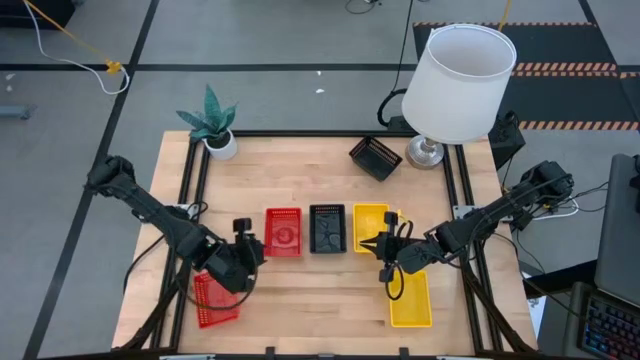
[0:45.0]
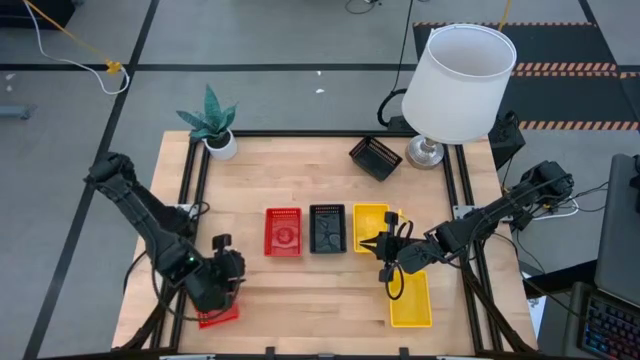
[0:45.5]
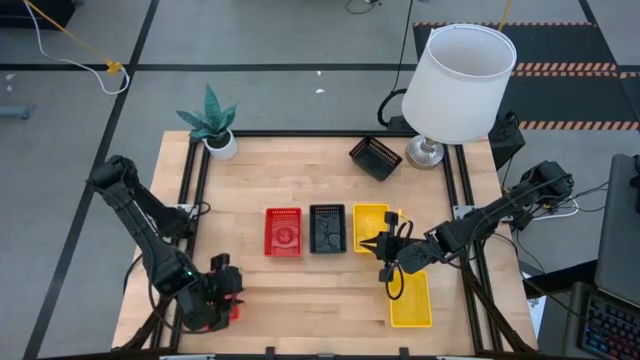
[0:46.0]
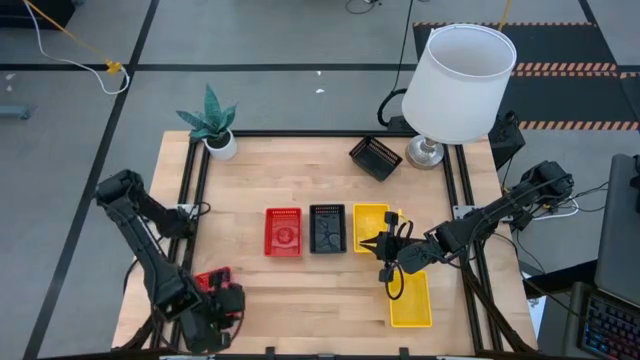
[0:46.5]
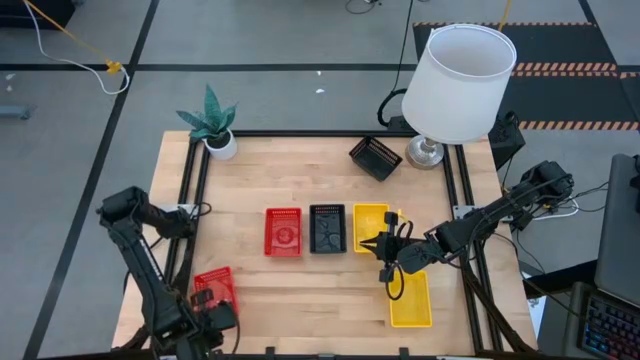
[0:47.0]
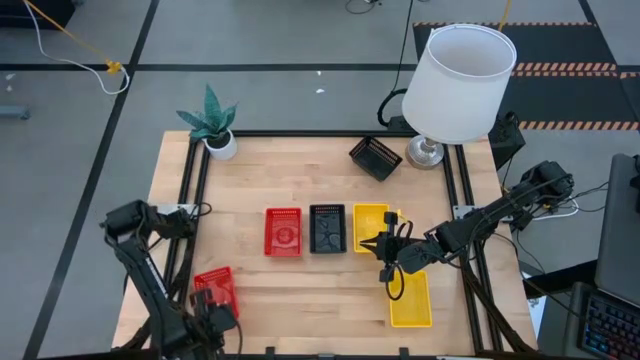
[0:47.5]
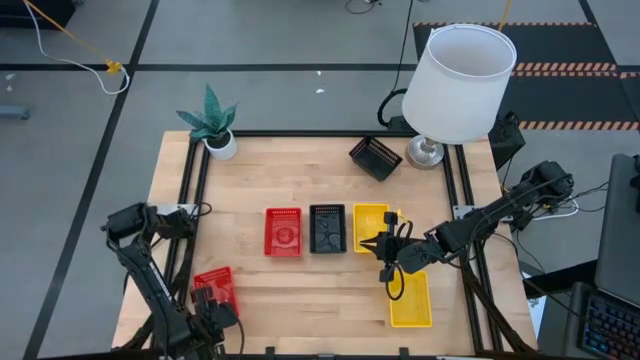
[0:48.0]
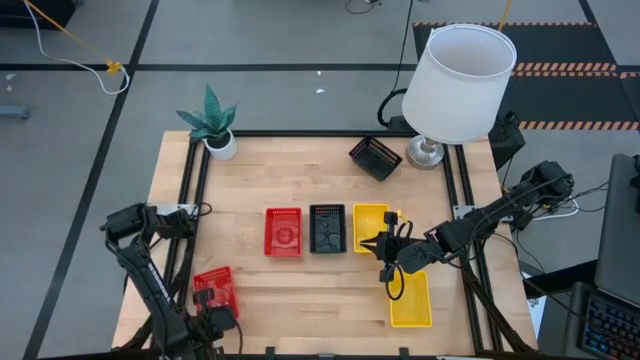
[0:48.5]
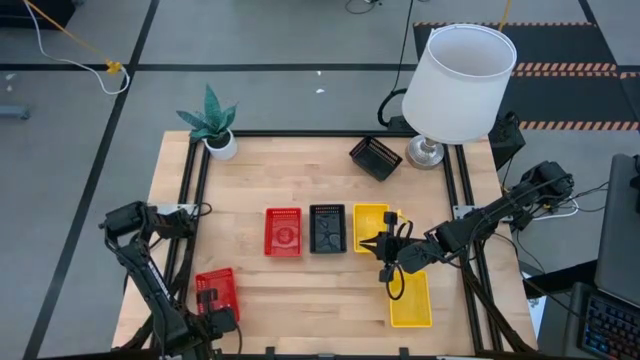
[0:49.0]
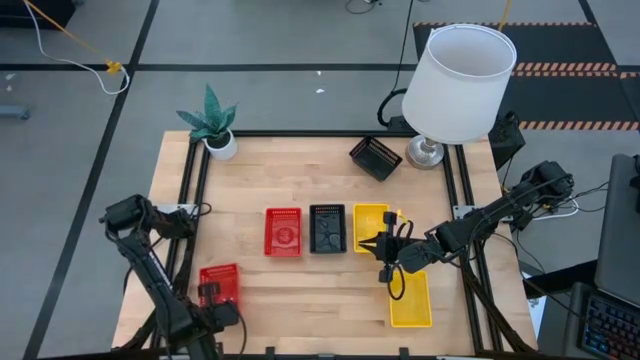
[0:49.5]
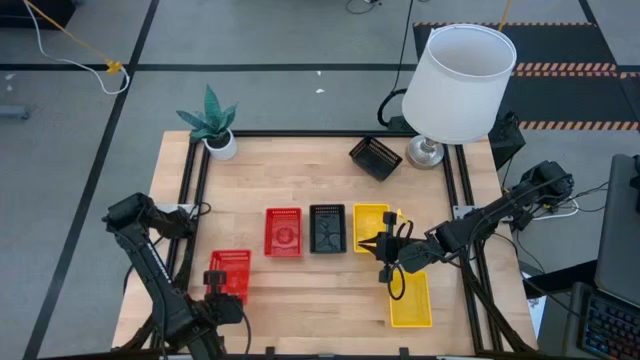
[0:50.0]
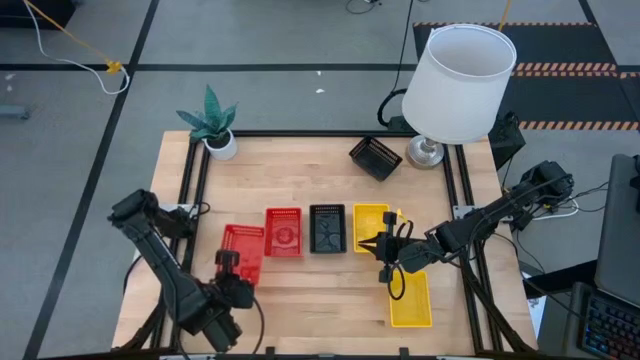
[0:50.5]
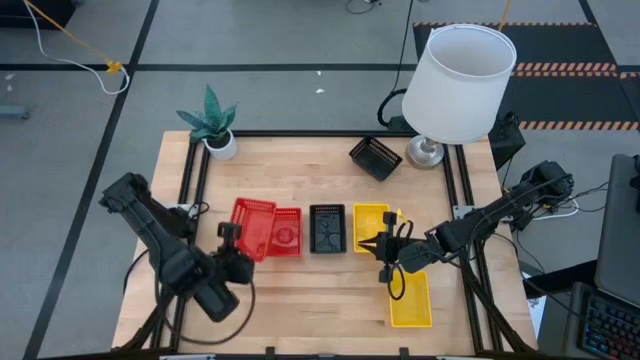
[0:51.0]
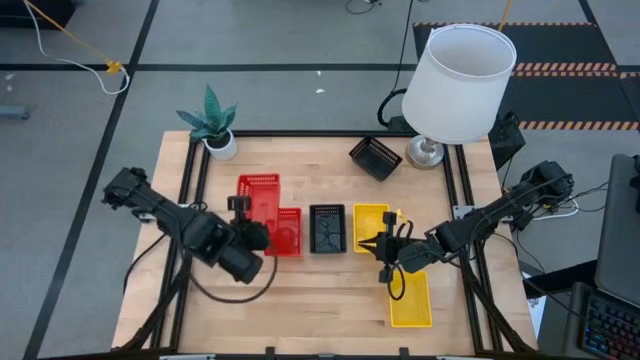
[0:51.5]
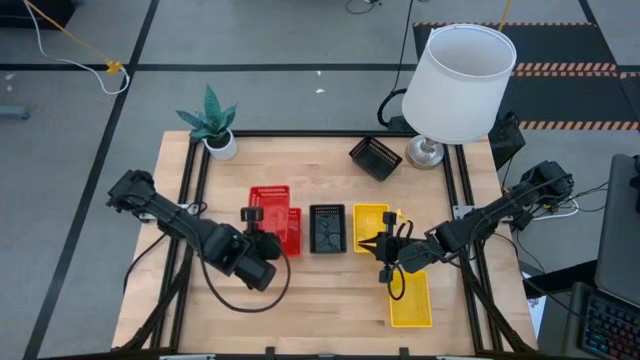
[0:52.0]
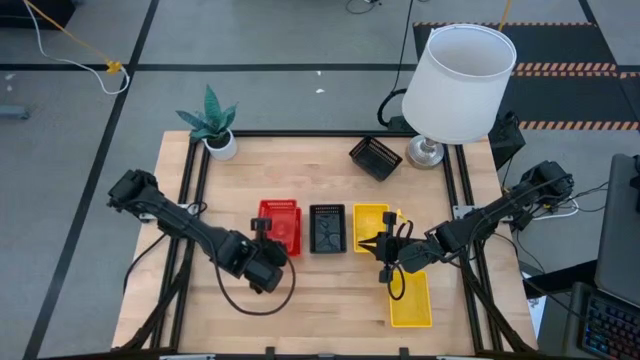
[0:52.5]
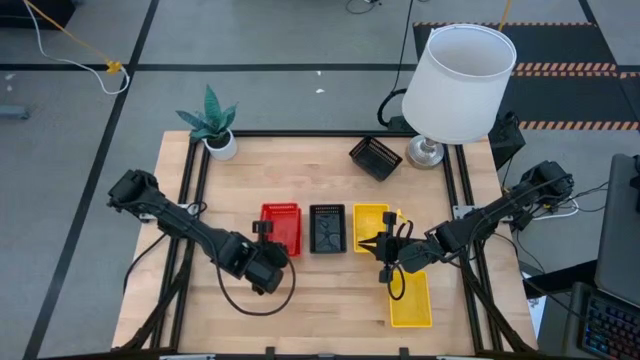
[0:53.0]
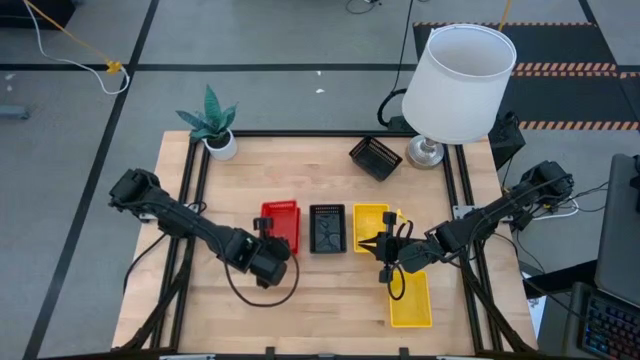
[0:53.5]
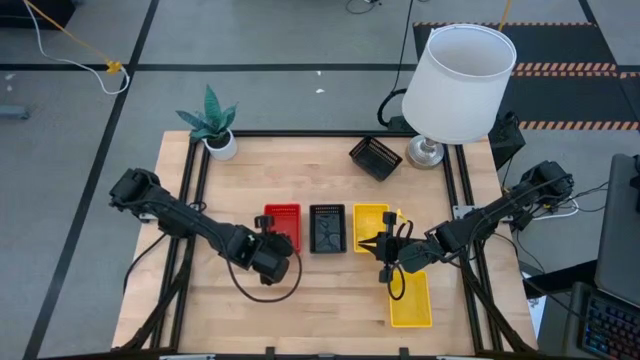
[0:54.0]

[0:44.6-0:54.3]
Stack the bottom red bin on top of the top red bin

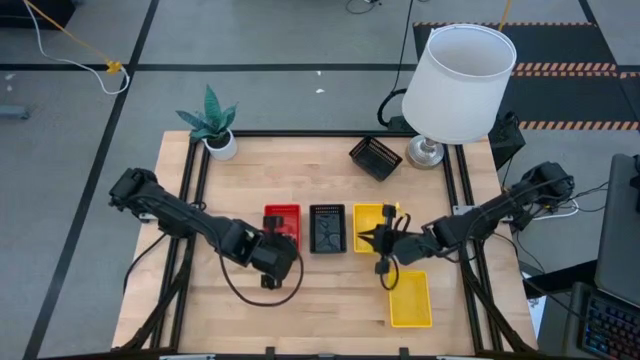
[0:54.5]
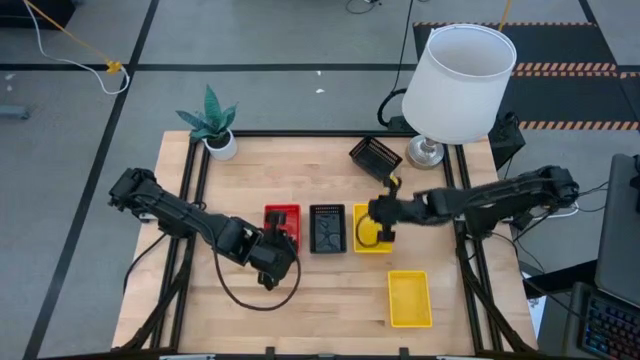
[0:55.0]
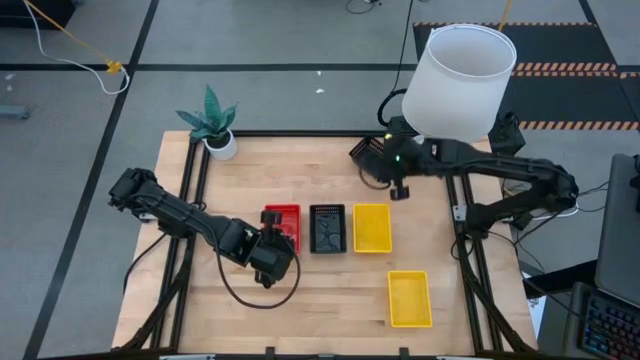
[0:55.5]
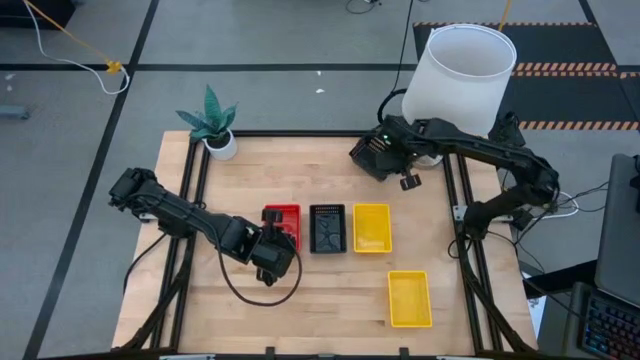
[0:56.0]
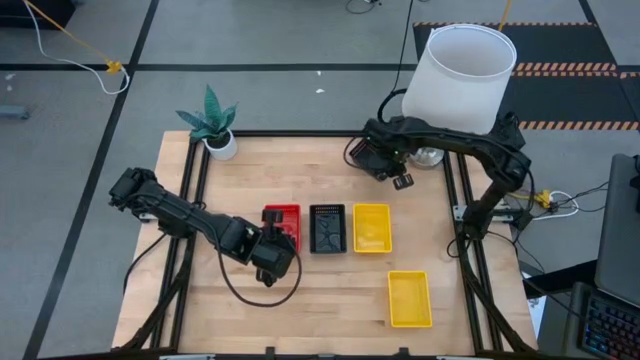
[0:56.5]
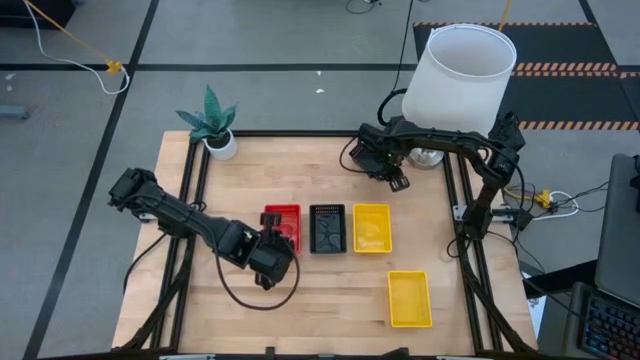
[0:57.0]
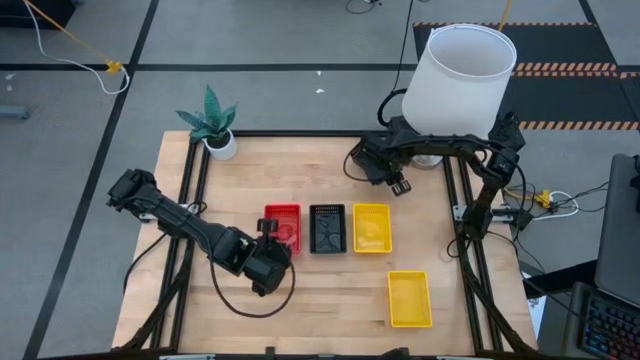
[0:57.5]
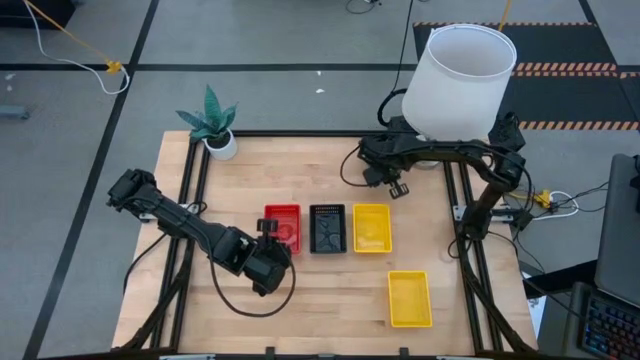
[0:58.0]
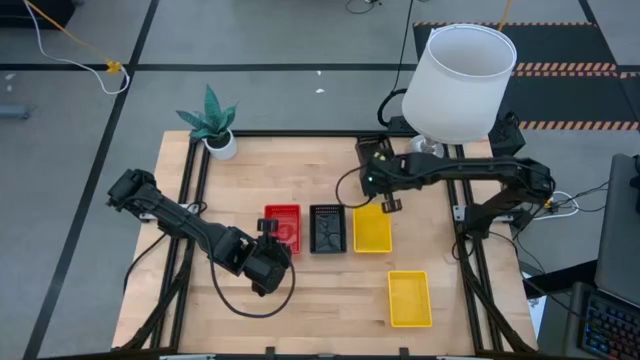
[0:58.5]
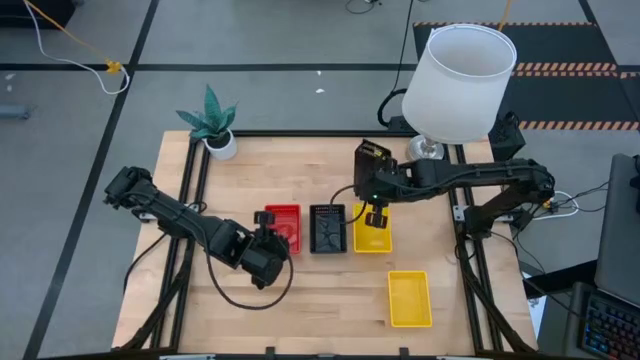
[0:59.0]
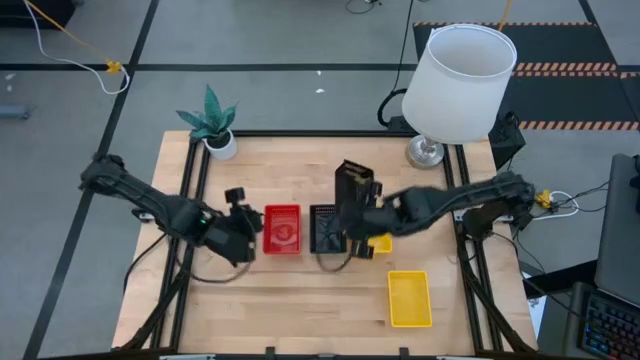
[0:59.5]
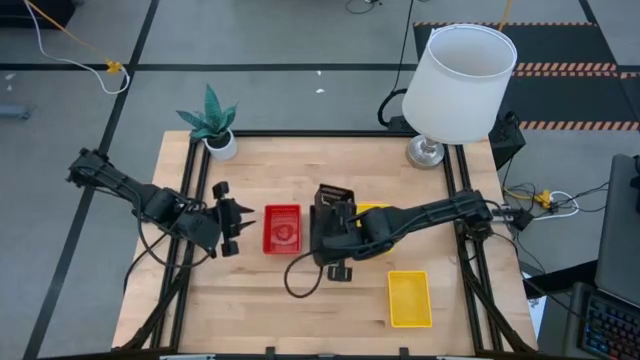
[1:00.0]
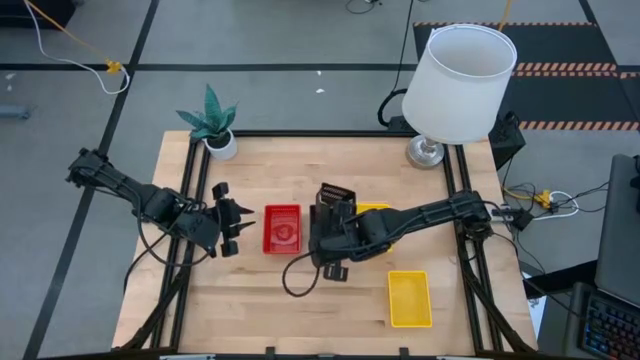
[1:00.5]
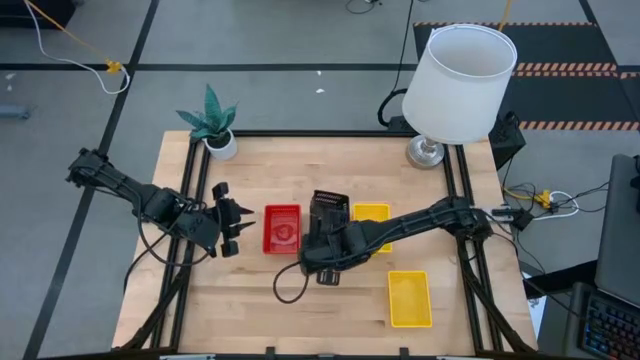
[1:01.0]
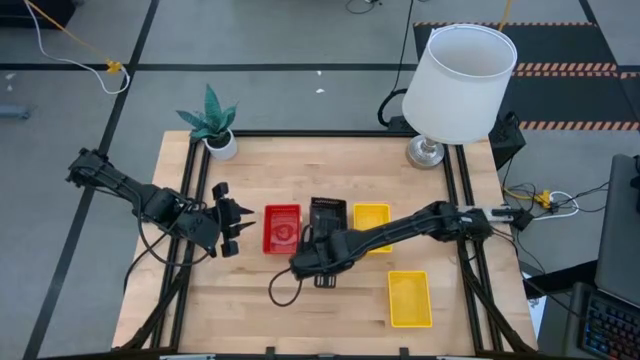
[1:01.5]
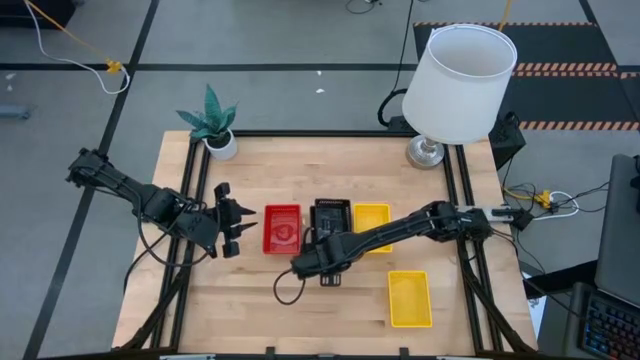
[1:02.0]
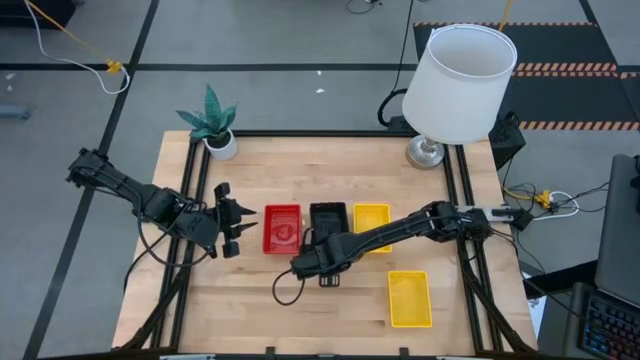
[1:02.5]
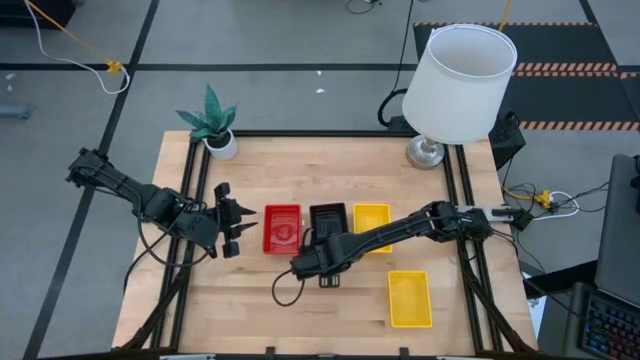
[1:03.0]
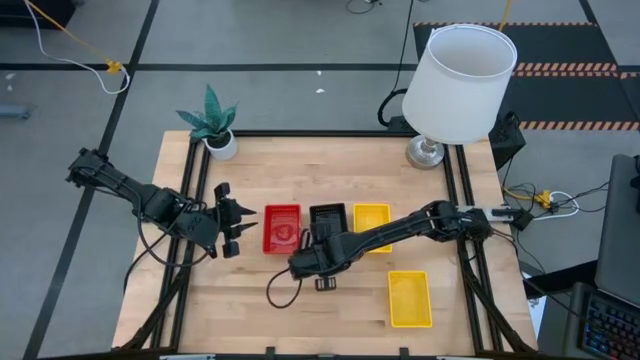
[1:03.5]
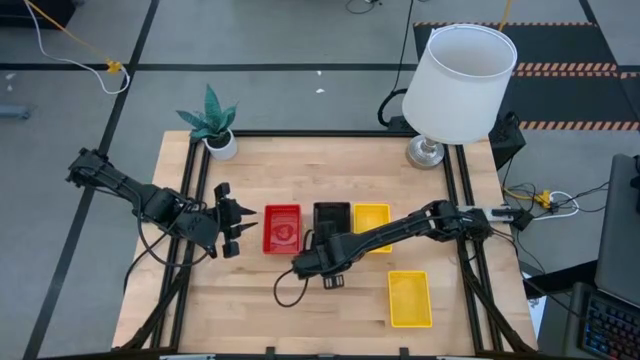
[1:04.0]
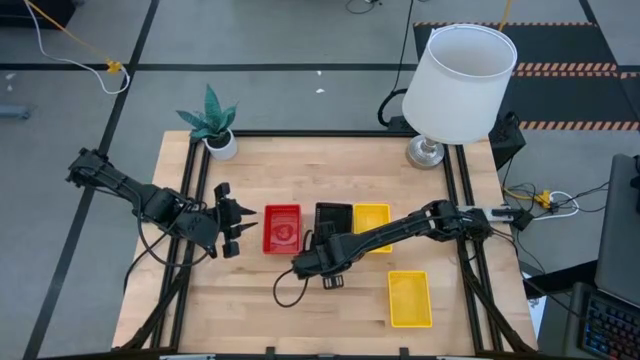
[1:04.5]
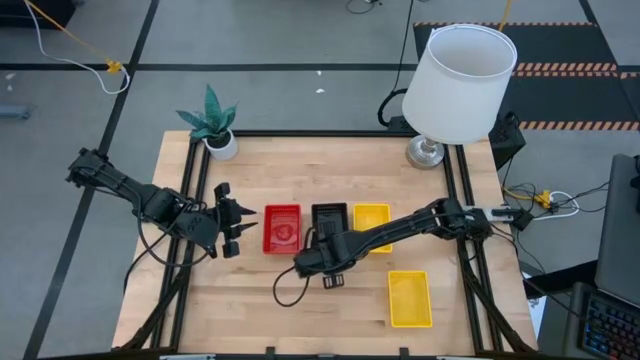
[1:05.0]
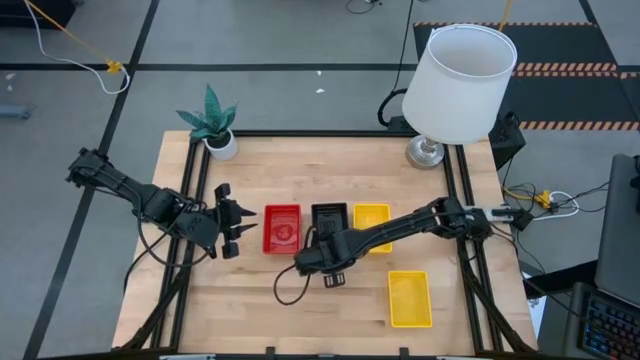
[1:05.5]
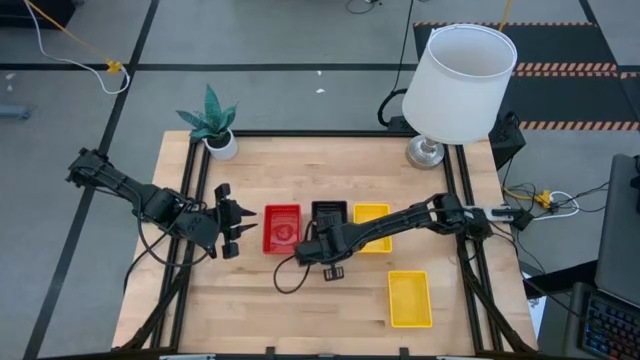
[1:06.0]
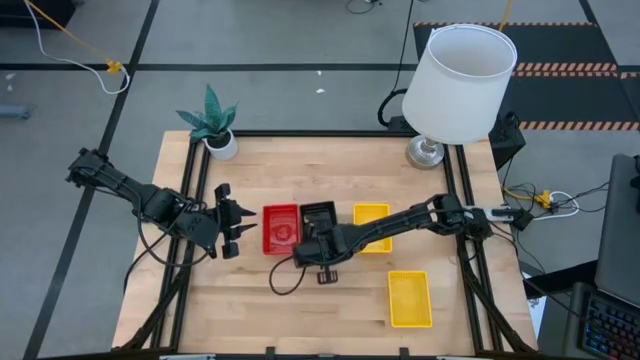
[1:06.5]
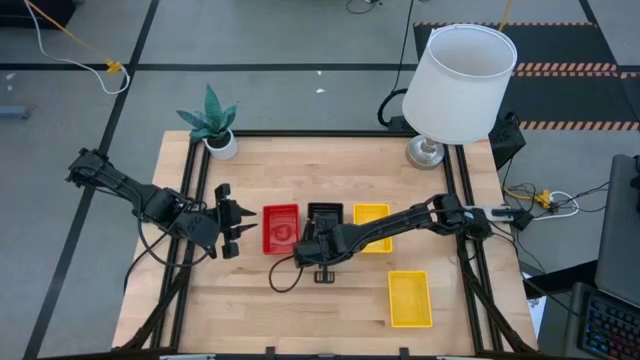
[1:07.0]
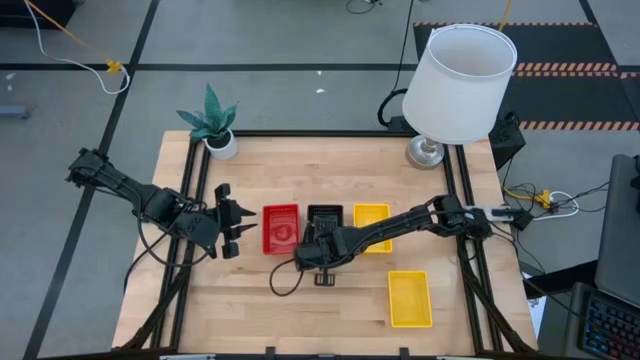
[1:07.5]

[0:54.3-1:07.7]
Stack the top black bin on top of the bottom black bin
